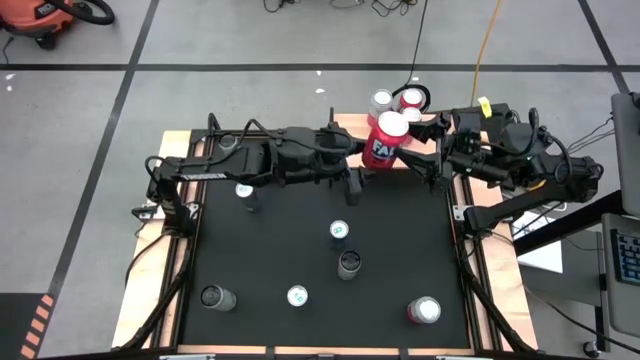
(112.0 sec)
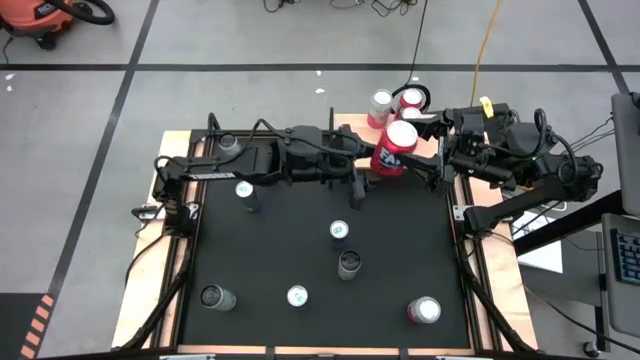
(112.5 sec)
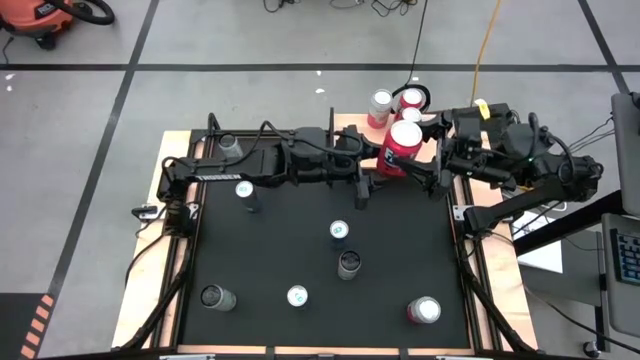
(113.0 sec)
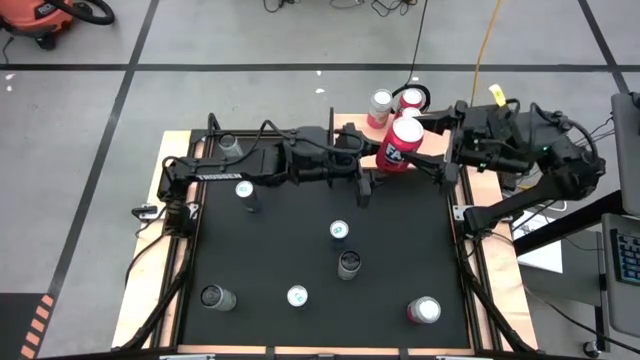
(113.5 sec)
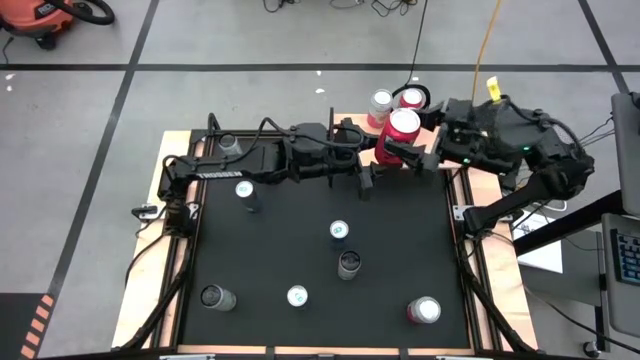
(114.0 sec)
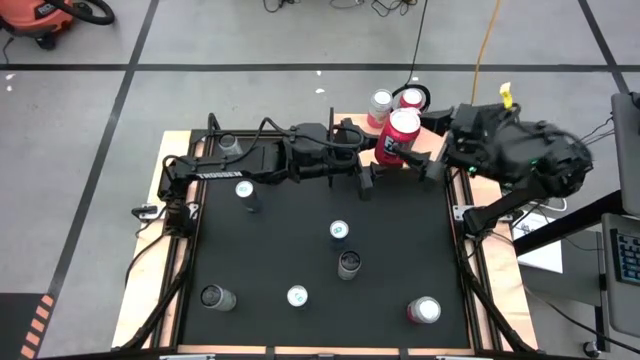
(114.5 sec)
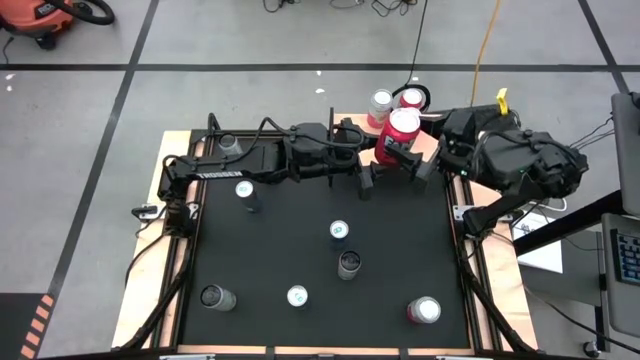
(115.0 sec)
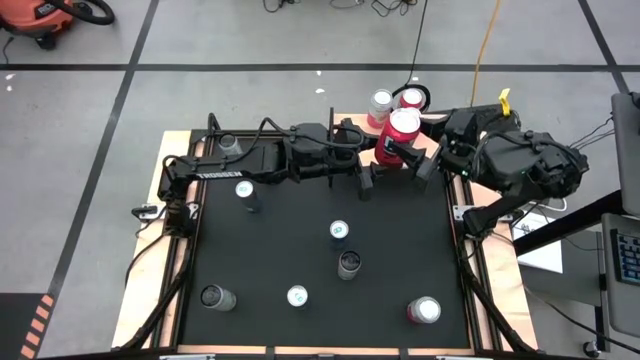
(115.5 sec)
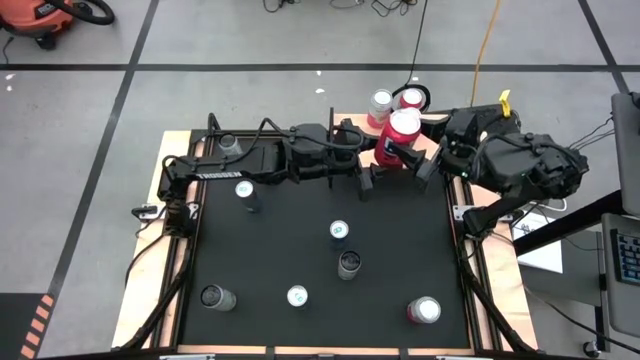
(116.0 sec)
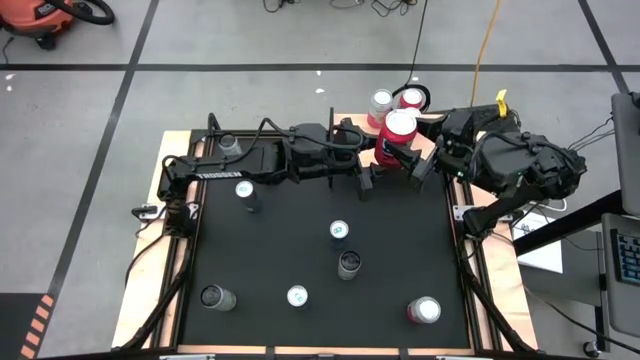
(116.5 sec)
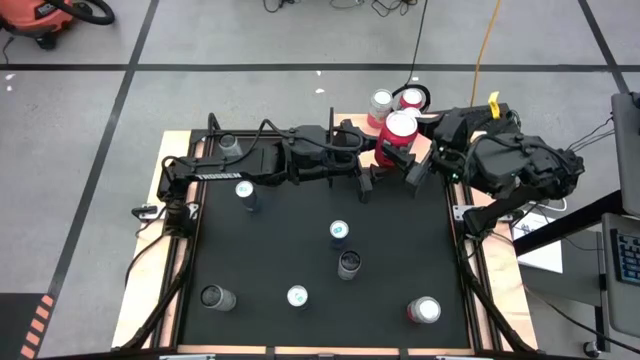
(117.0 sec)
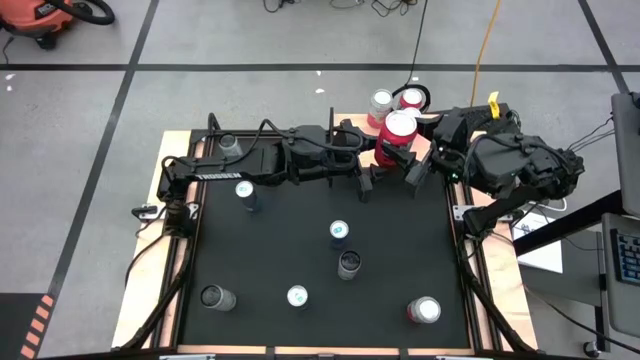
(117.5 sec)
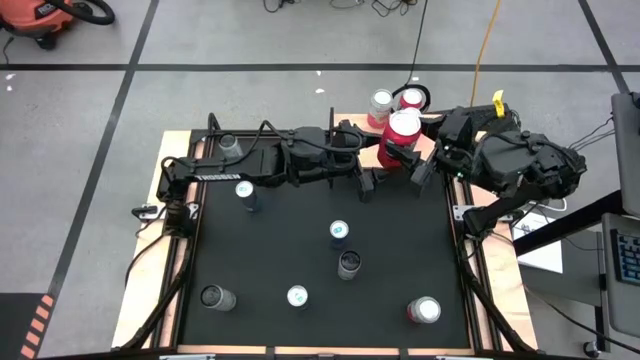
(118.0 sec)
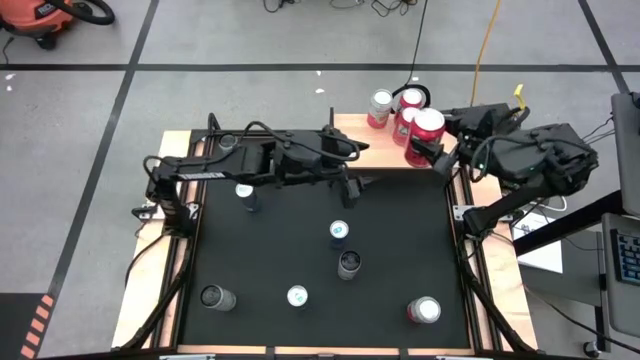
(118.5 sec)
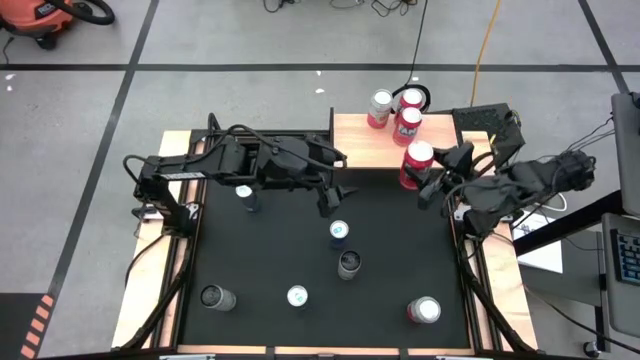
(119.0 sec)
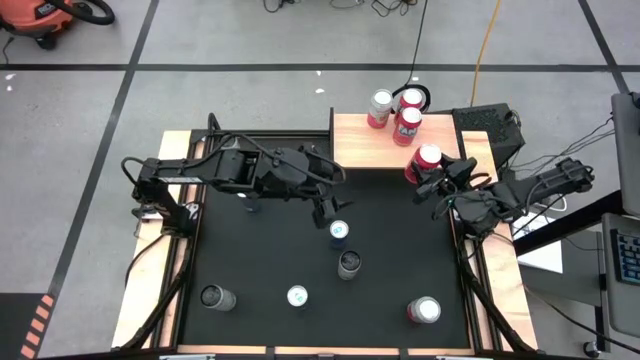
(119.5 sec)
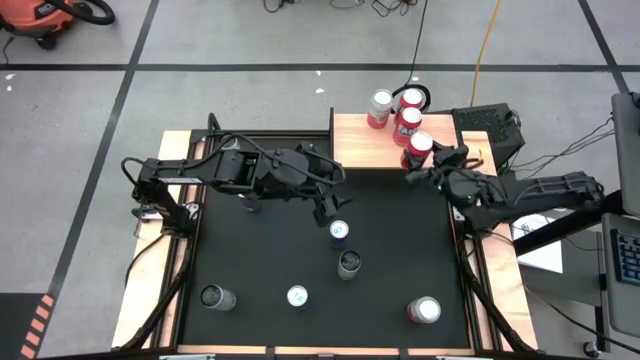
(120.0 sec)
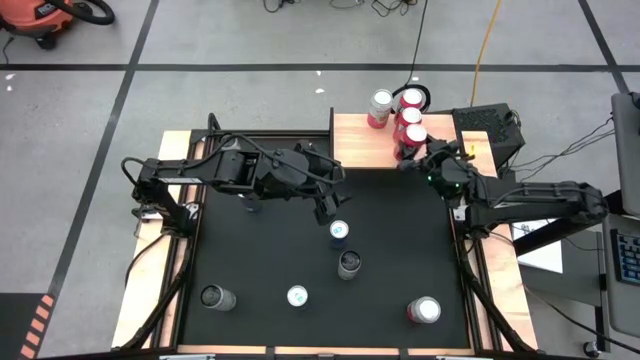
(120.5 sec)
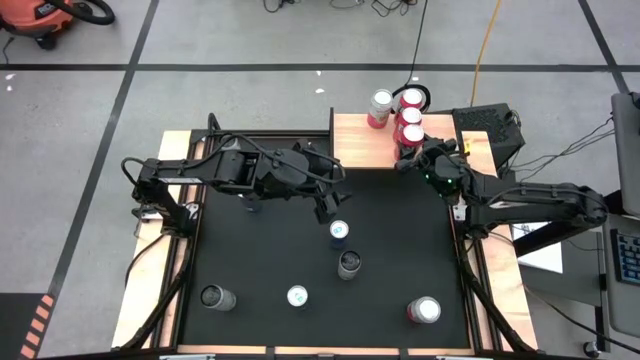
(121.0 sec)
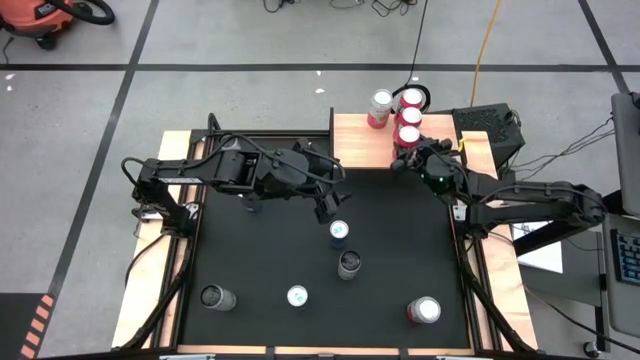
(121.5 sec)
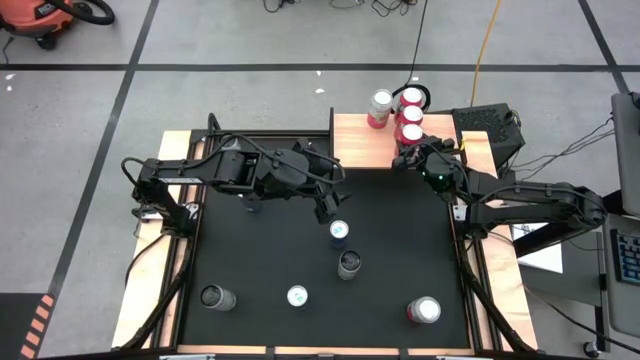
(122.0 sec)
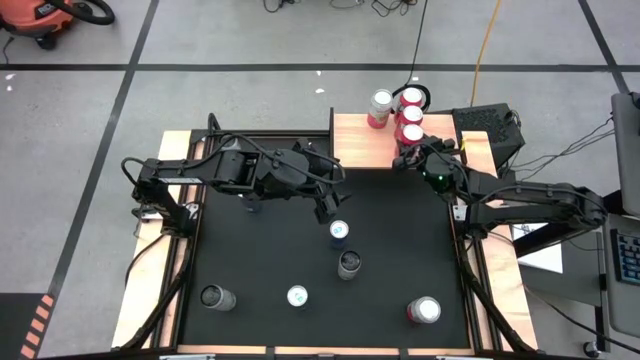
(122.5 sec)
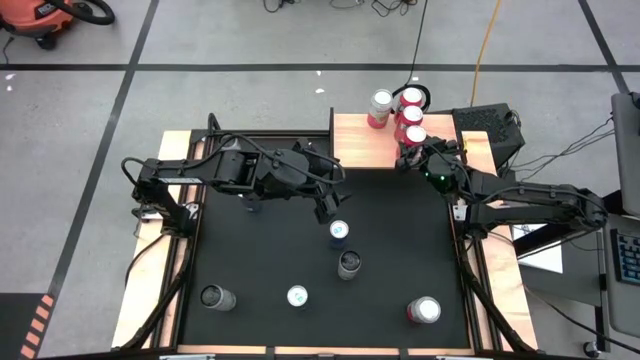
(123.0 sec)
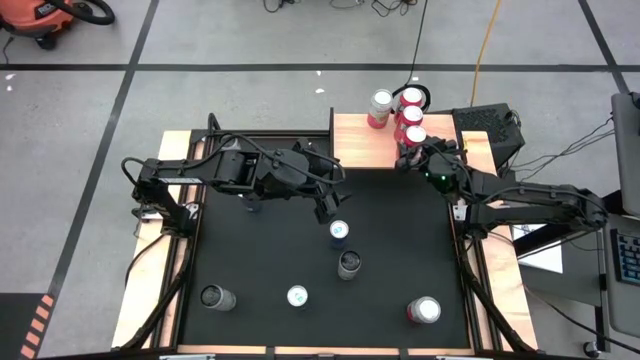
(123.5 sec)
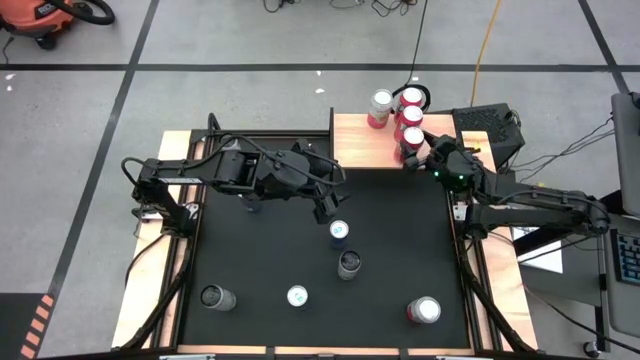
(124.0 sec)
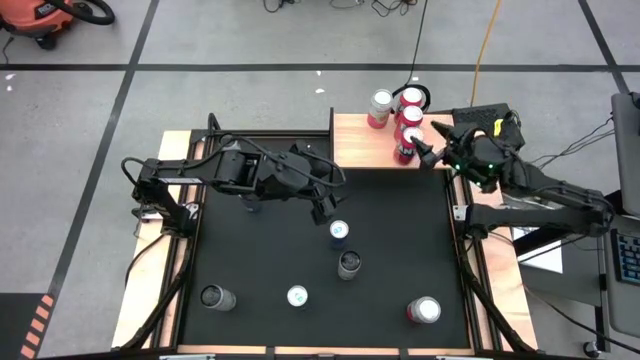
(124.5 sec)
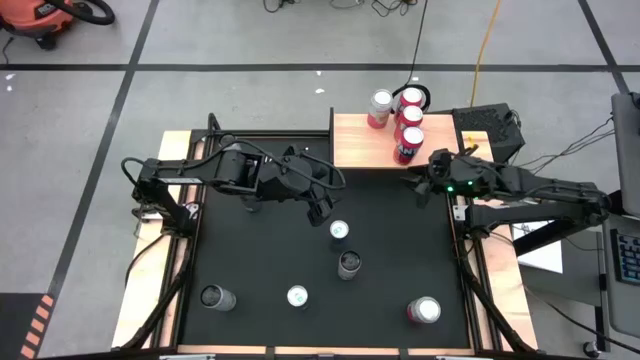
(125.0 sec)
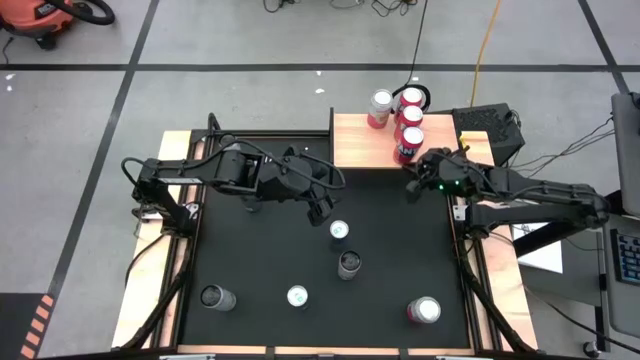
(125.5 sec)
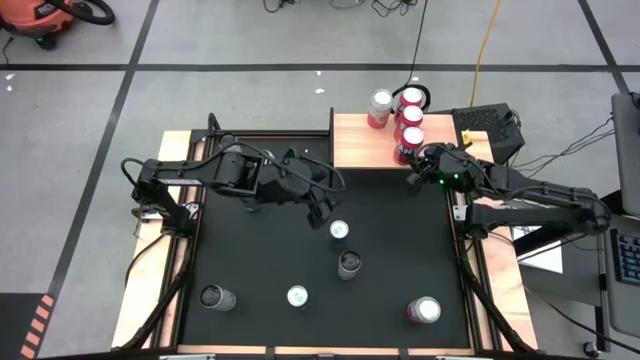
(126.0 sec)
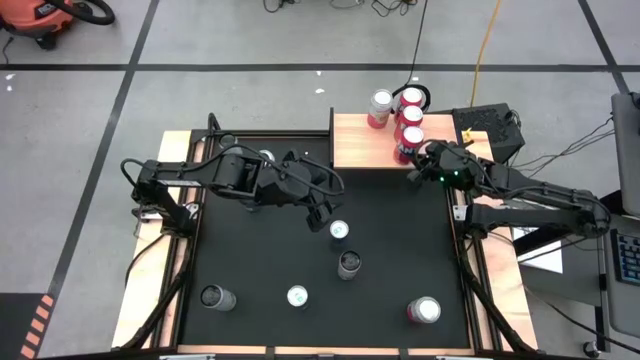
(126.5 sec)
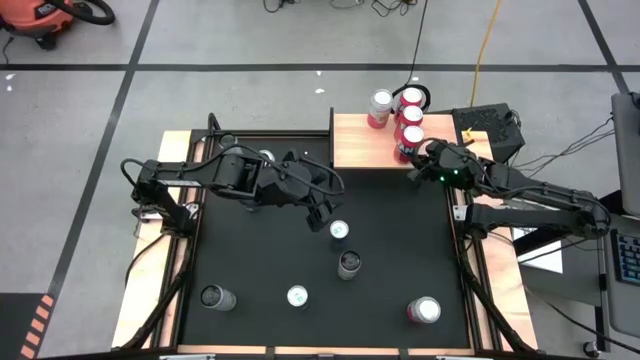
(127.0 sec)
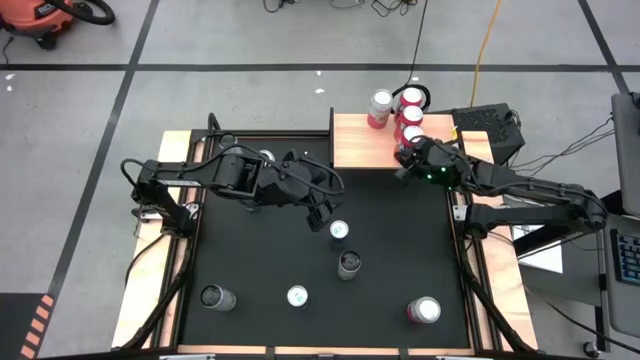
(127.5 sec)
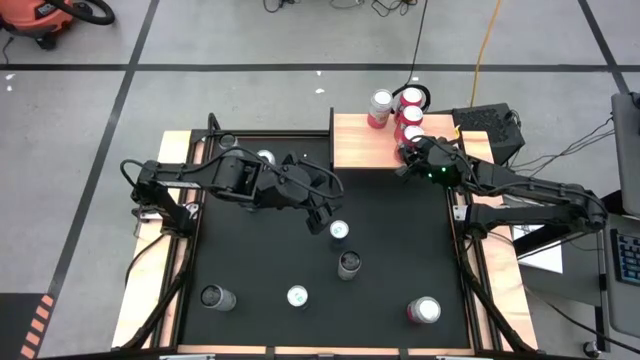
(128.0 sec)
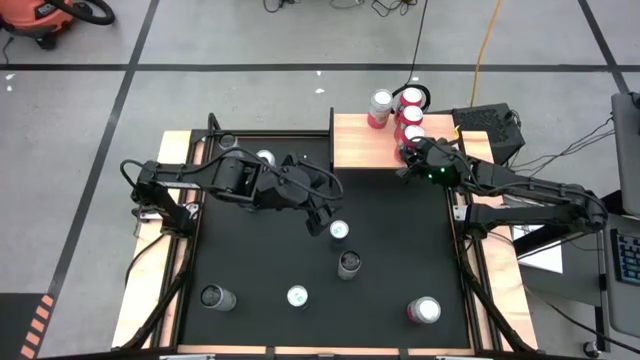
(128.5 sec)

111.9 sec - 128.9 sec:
Task: Place canned beverage on shelf
Put the red soda can on the shelf aligned with the other red soda cans

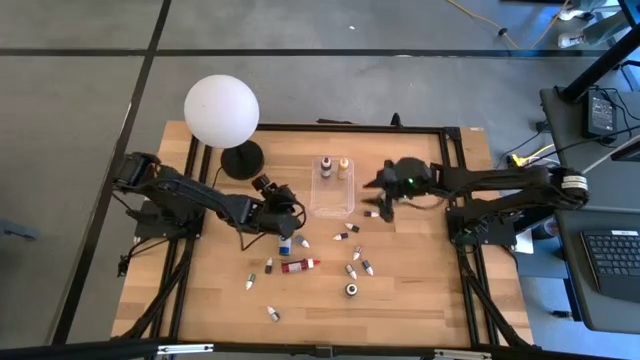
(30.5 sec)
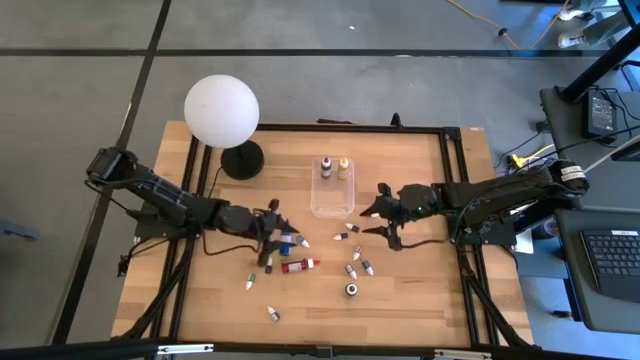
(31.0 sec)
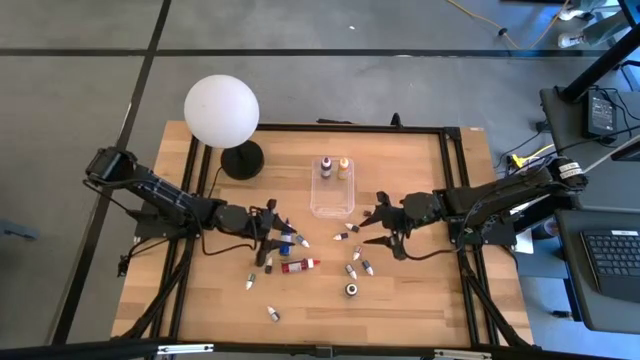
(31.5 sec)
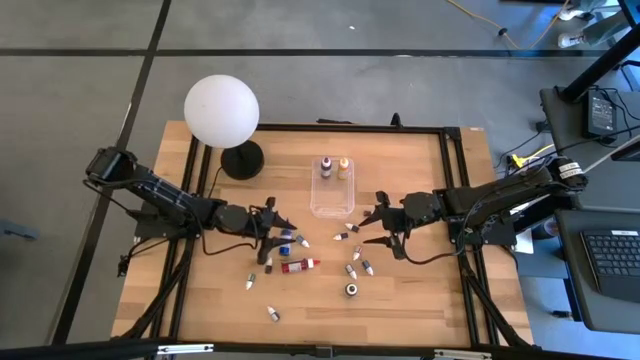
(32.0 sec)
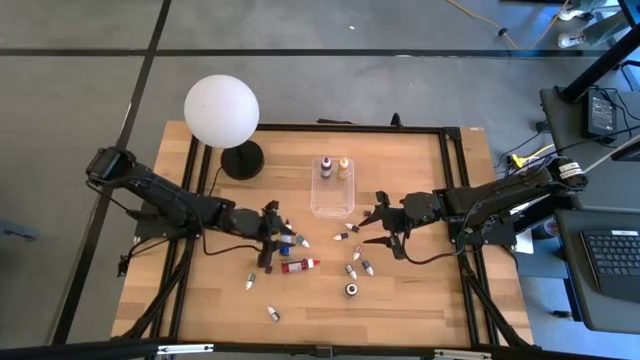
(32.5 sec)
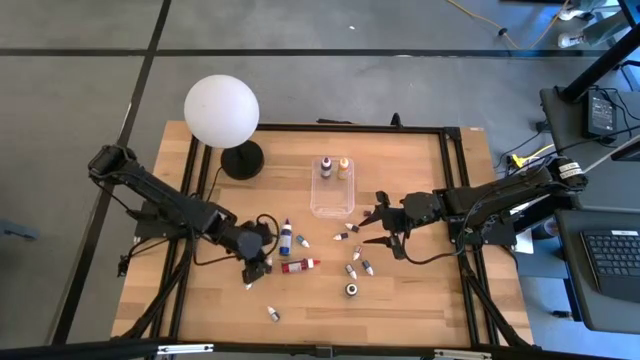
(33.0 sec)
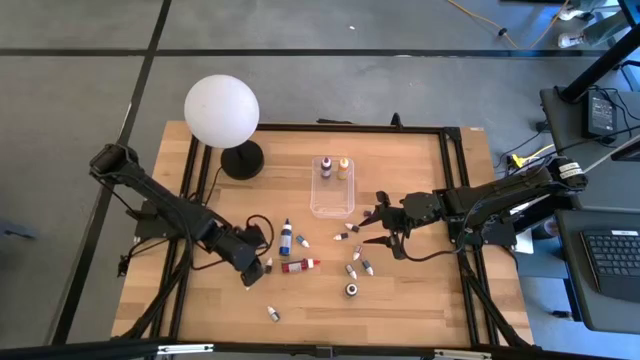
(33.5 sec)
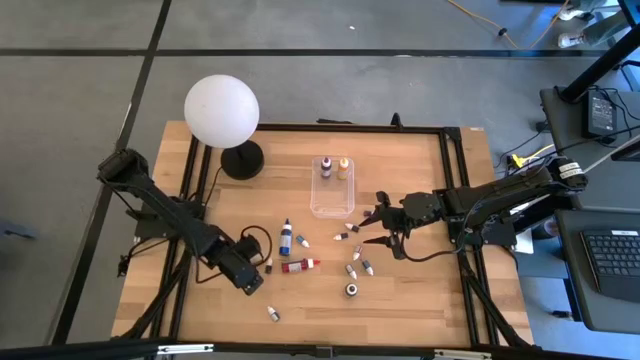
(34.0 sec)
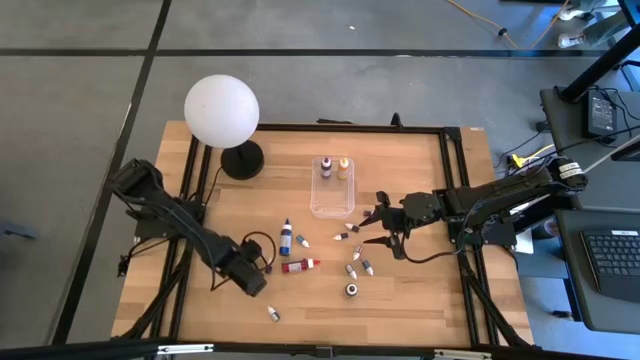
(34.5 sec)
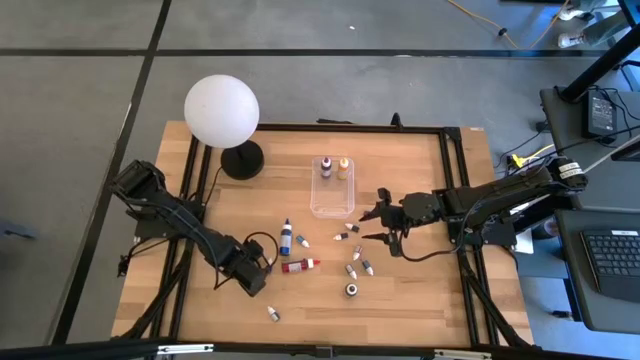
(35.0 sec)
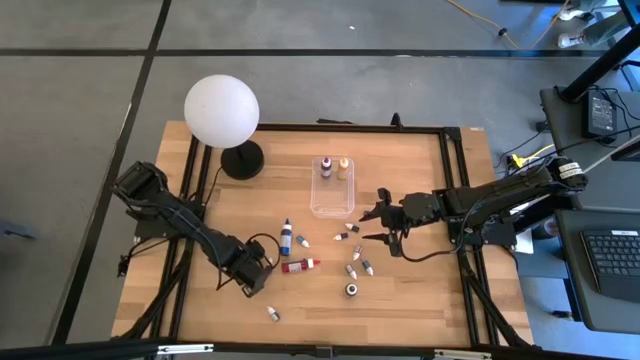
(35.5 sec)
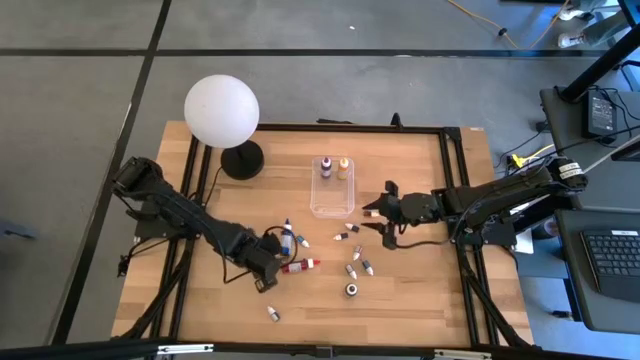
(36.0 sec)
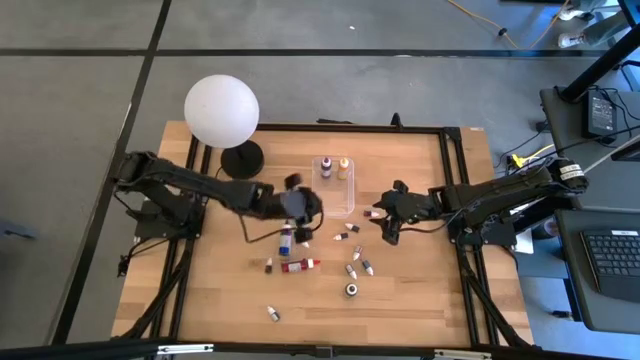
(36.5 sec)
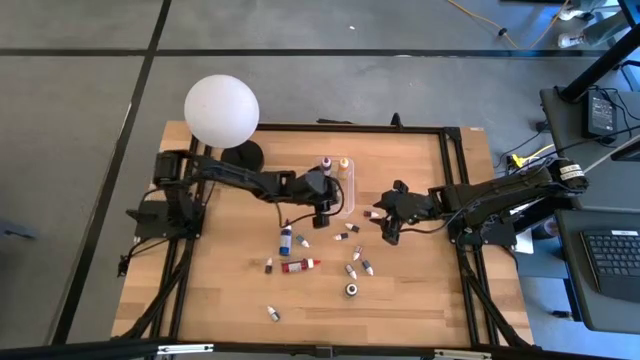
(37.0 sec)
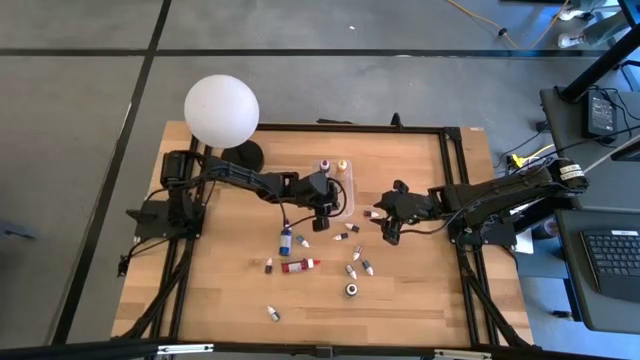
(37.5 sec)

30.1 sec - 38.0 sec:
Task: Pick & Place food coloring
Put the small green food coloring bottle in the transparent bin
